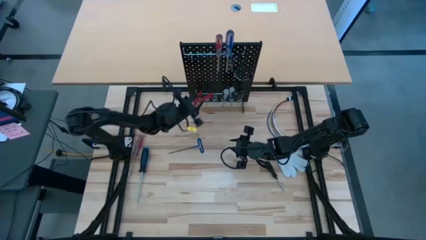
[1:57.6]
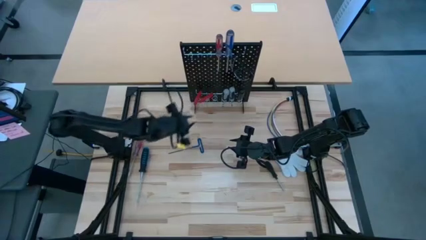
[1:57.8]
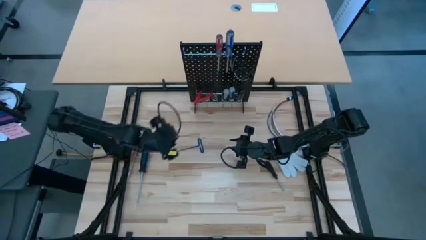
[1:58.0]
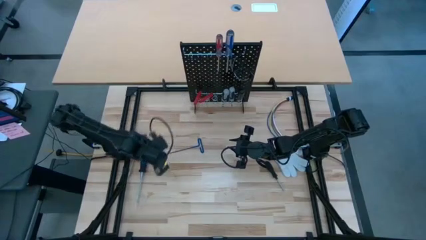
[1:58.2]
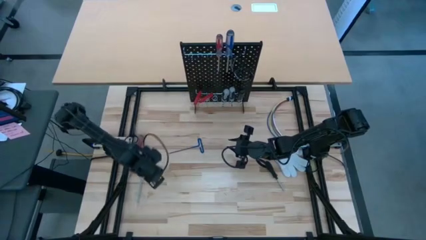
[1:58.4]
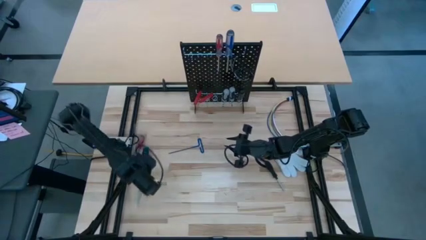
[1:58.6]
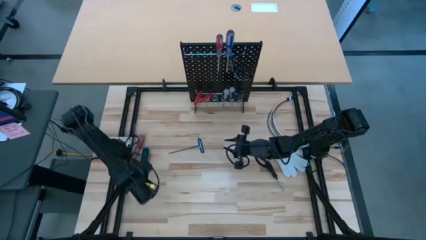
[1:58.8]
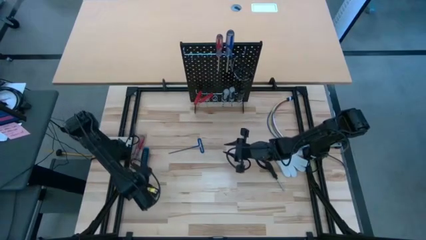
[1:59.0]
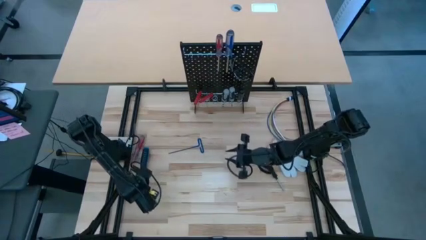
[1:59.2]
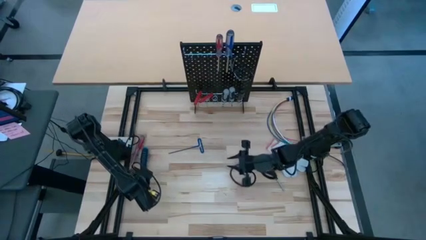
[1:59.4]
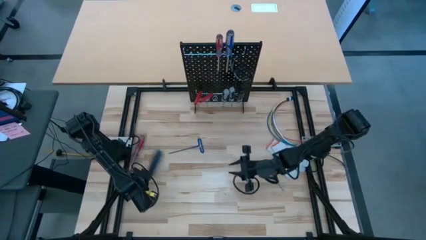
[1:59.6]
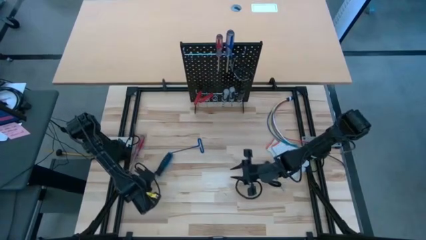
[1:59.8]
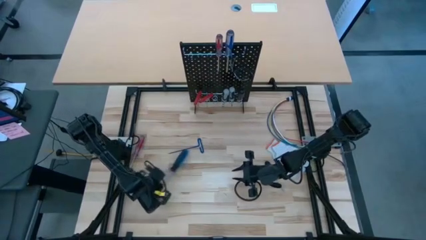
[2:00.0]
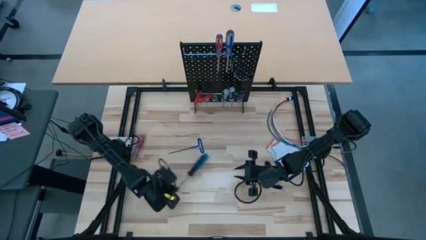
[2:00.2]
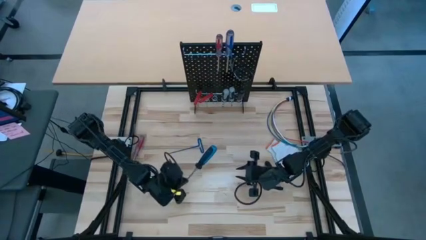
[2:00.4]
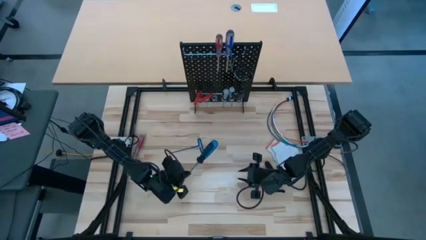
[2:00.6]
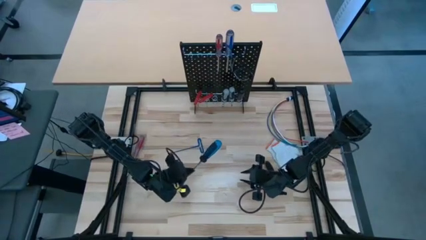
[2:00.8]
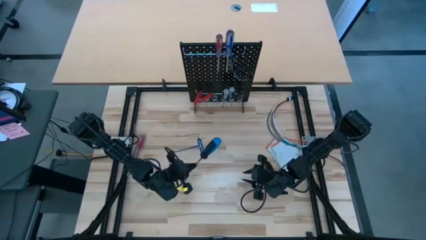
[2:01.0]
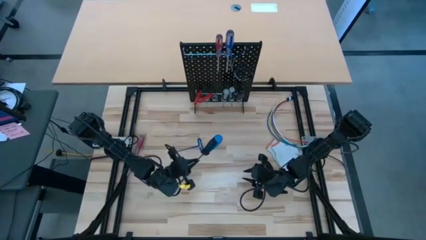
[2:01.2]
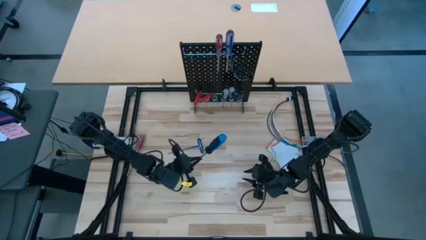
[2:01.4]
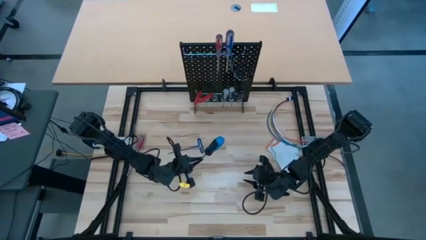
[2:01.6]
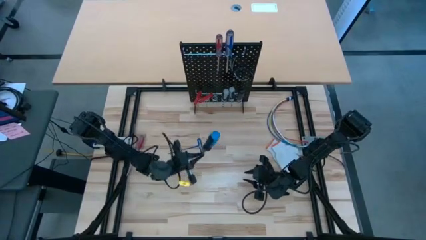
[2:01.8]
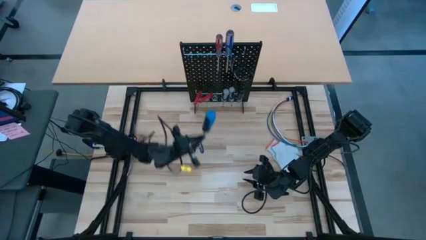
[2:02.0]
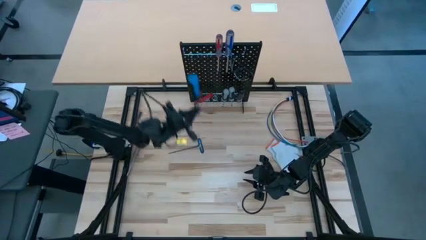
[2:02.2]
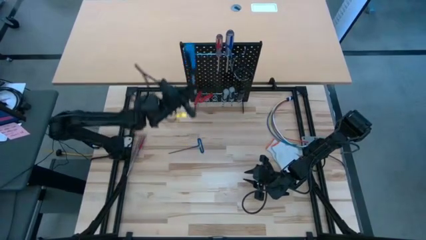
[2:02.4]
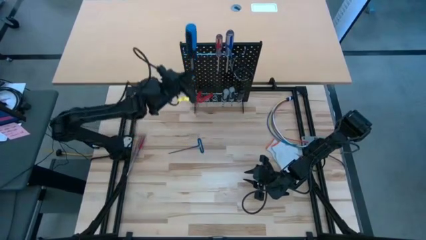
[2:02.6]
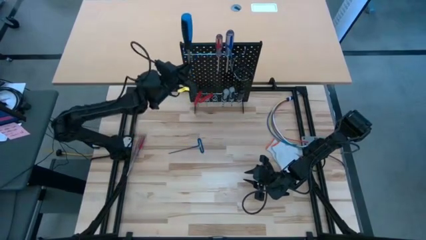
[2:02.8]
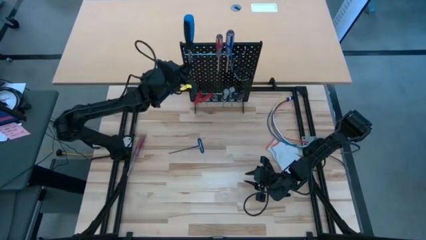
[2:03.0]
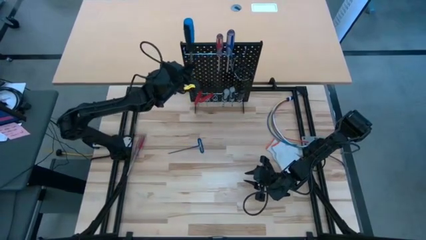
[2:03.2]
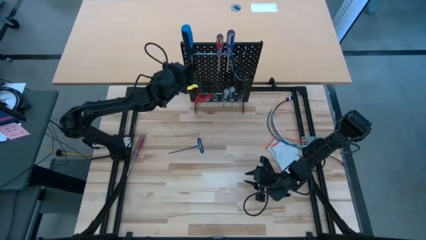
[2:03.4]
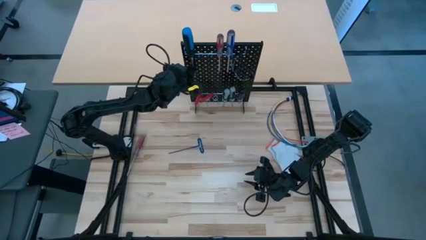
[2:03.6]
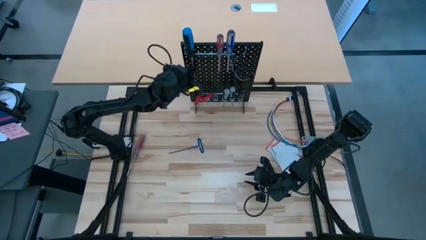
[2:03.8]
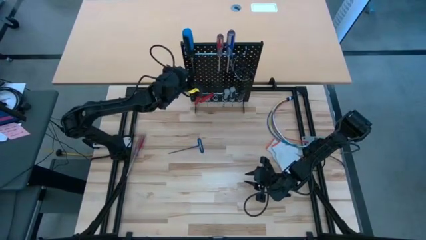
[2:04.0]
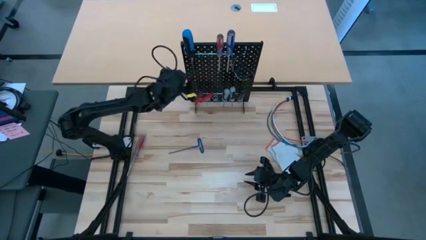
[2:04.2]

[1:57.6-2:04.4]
Task: Hang tools onto peg board
Hang the blue screwdriver on the pegboard

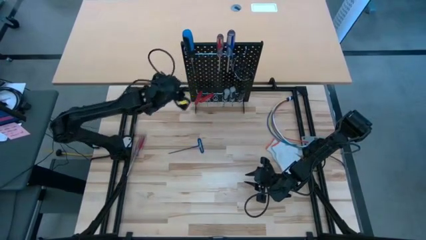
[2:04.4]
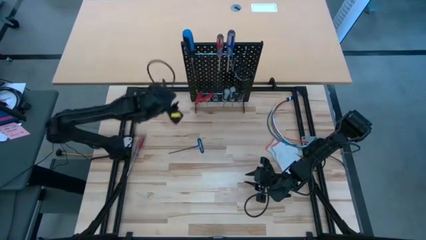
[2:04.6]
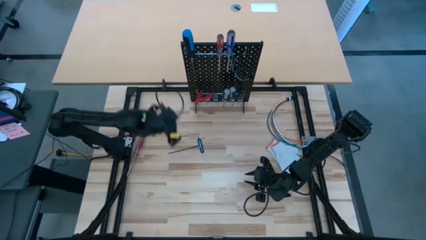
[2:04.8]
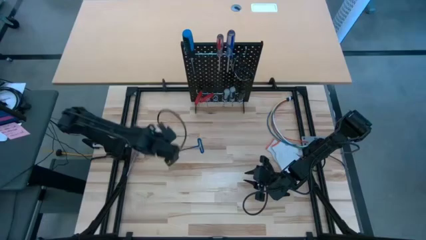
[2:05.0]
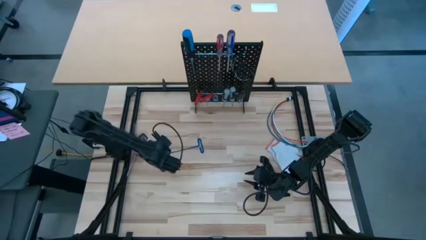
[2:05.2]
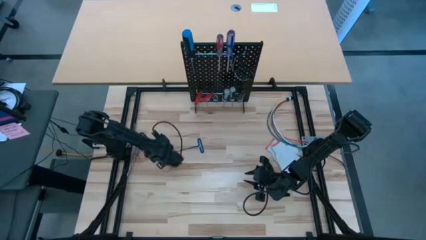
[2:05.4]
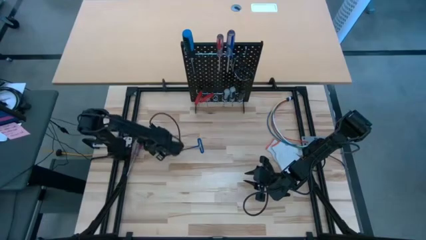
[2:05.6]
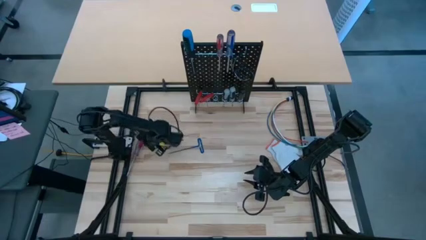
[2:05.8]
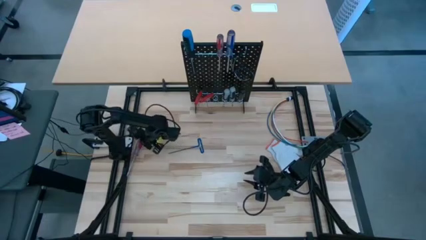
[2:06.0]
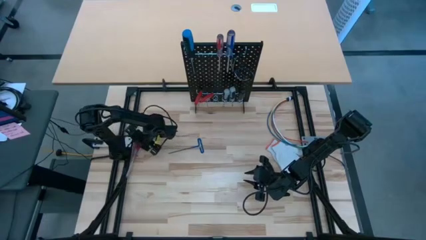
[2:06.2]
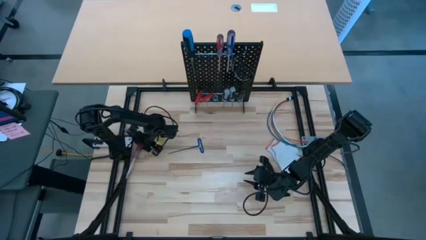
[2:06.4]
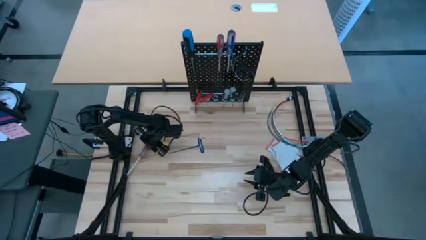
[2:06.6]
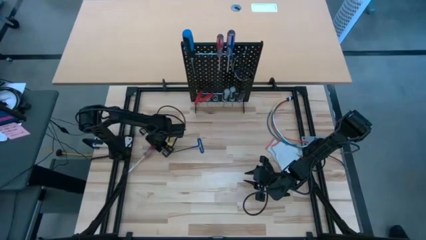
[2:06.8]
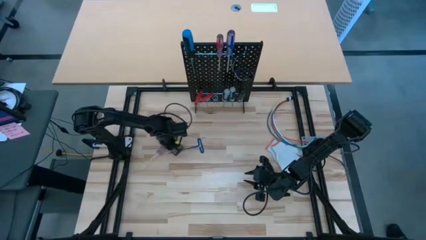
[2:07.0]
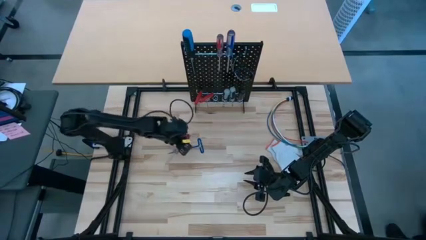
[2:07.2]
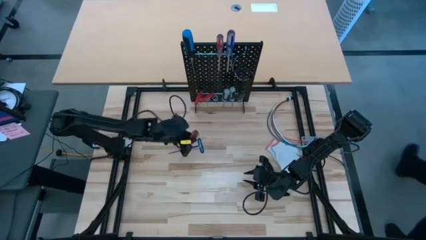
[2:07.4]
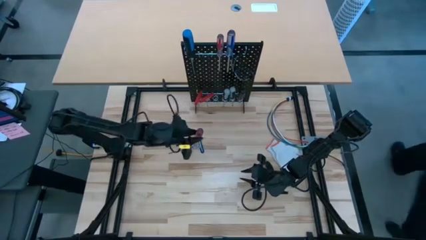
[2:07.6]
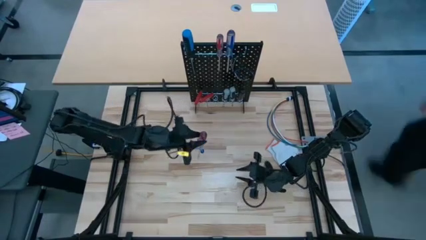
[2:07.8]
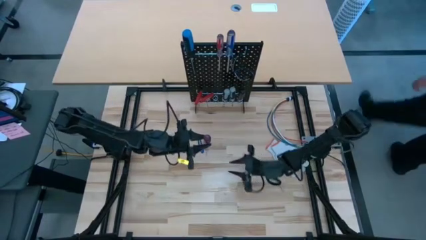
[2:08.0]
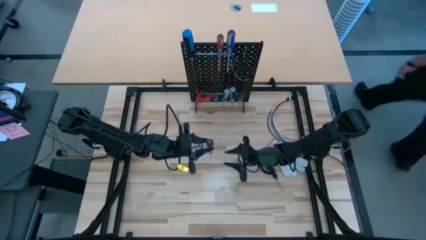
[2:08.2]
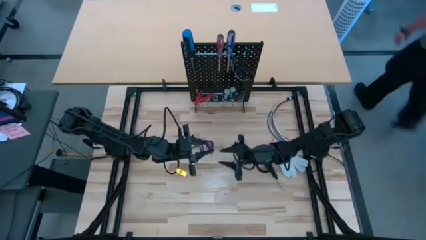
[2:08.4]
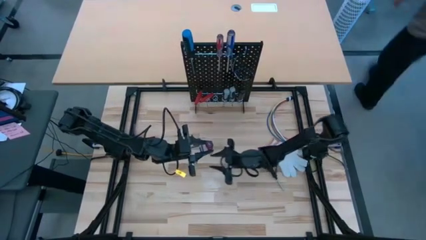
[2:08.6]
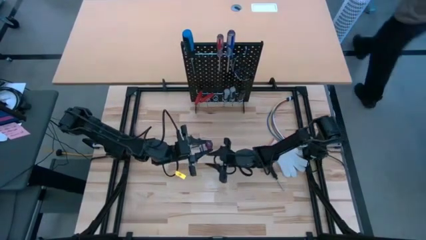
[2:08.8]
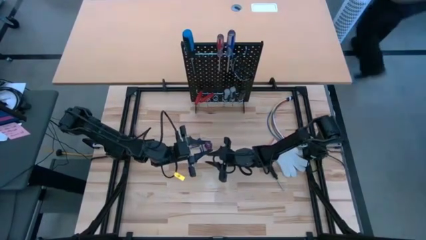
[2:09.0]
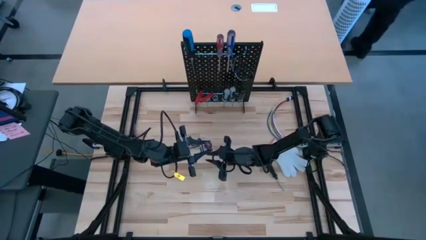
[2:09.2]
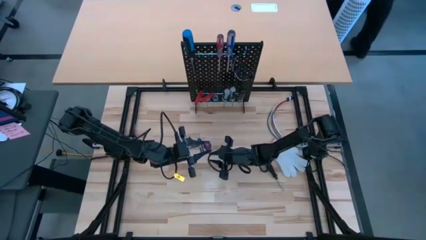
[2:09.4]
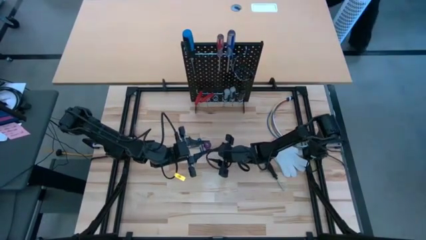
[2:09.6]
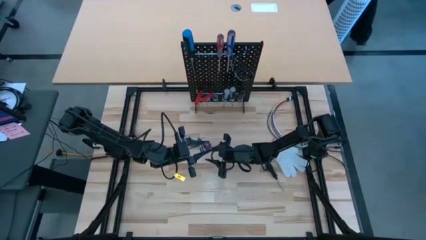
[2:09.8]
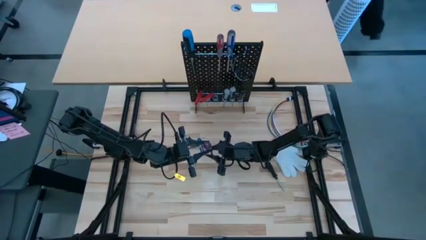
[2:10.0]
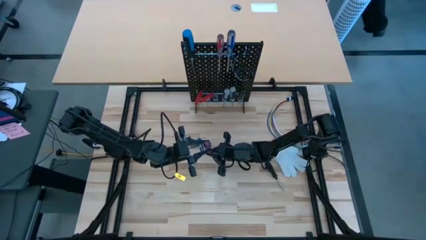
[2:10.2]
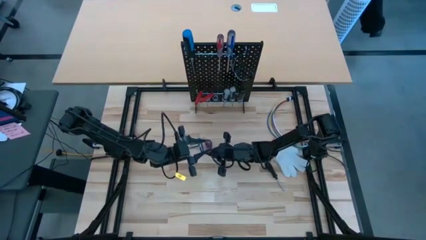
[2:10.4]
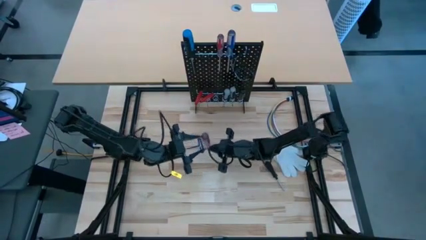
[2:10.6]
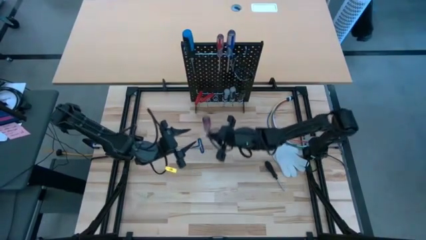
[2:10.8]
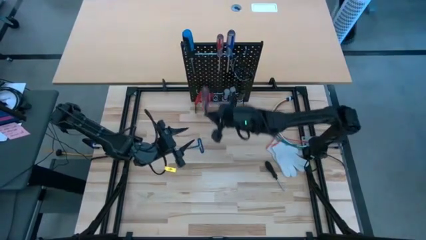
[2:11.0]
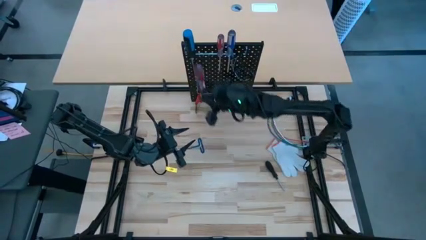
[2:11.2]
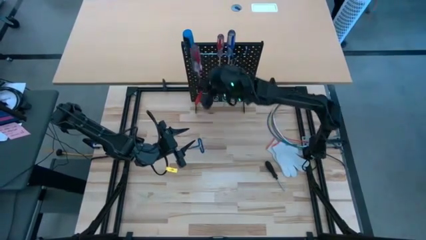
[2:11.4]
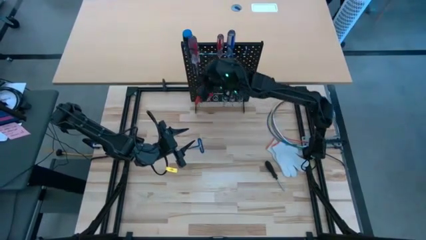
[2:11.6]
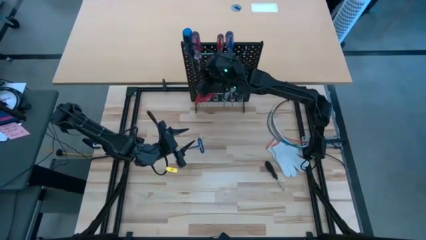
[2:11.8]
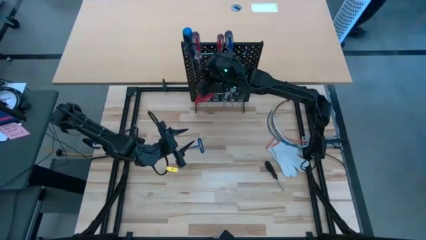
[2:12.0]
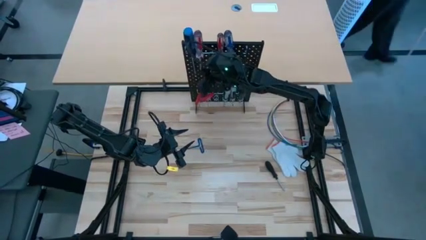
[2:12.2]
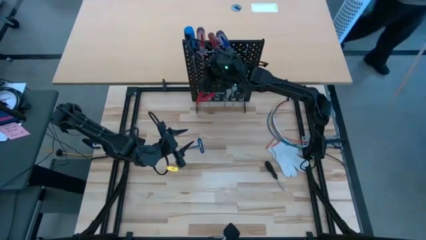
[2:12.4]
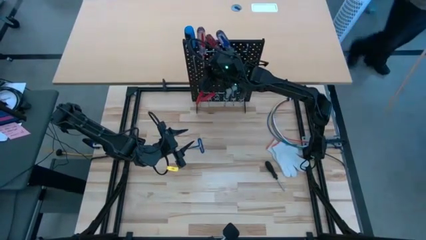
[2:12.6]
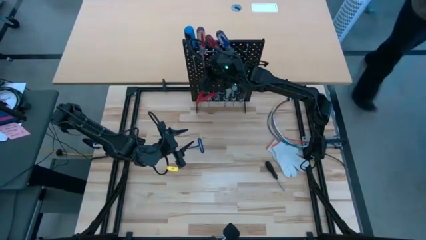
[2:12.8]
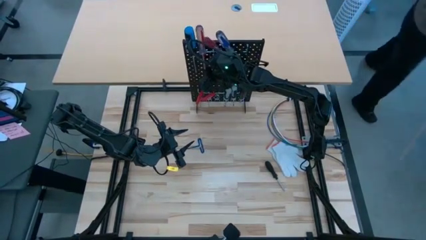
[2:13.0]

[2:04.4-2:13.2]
Hang the transparent red screwdriver on the pegboard
